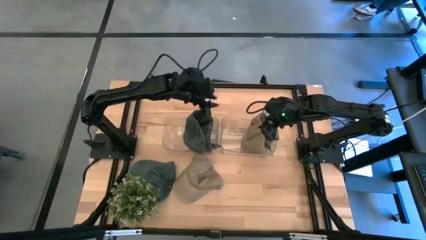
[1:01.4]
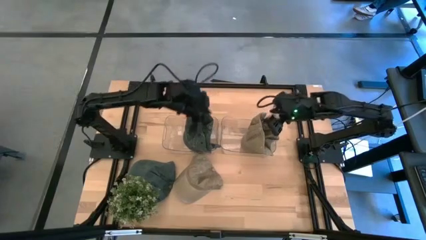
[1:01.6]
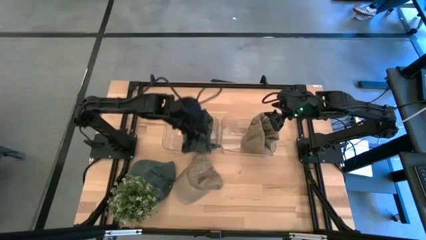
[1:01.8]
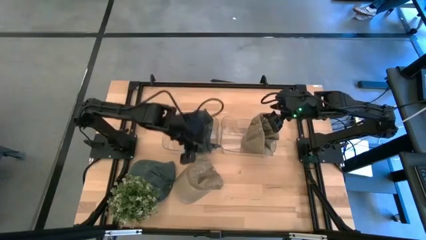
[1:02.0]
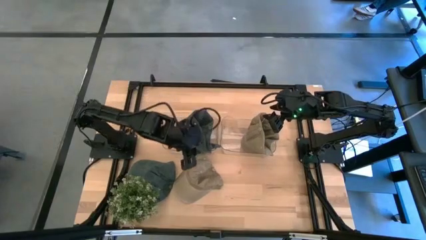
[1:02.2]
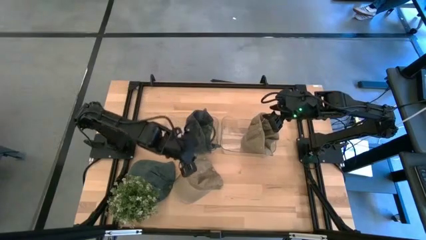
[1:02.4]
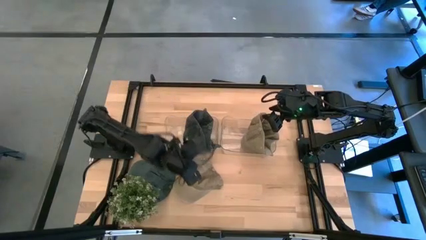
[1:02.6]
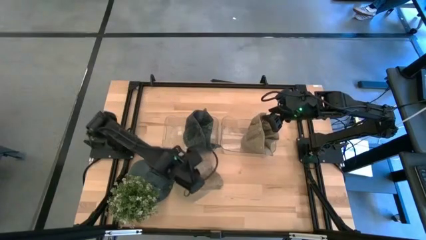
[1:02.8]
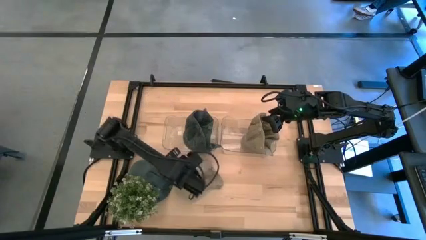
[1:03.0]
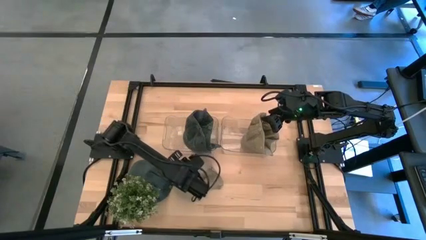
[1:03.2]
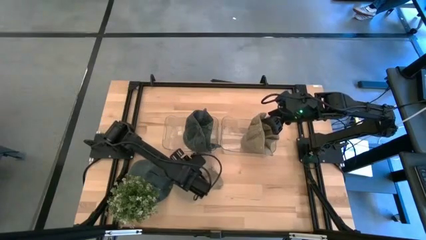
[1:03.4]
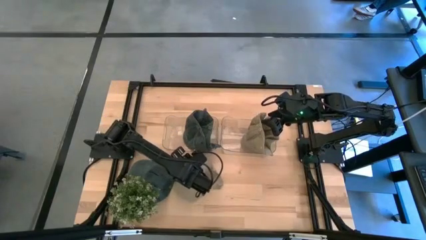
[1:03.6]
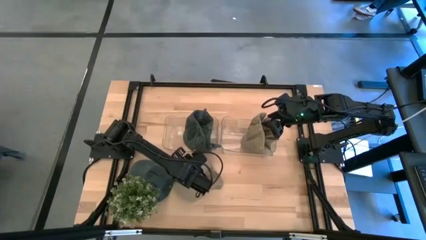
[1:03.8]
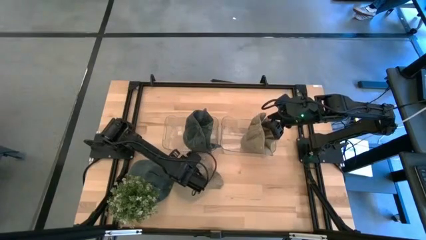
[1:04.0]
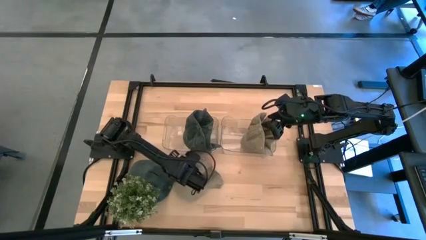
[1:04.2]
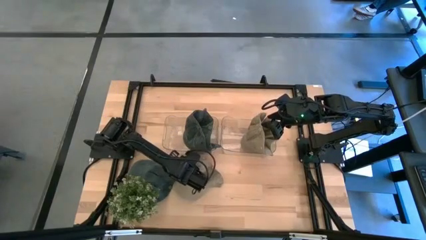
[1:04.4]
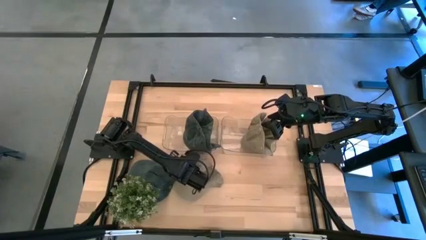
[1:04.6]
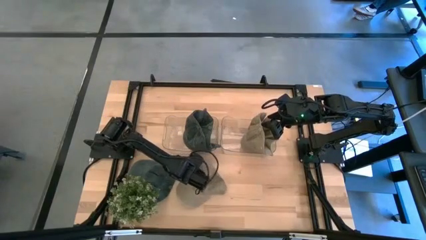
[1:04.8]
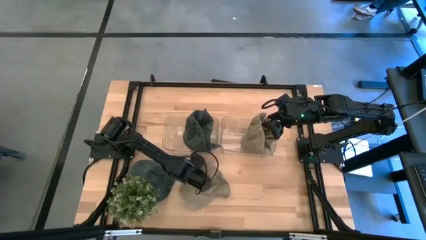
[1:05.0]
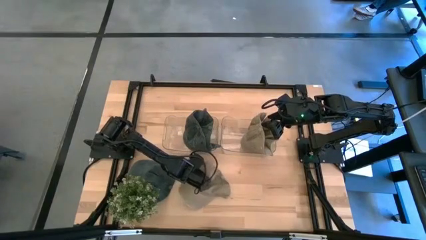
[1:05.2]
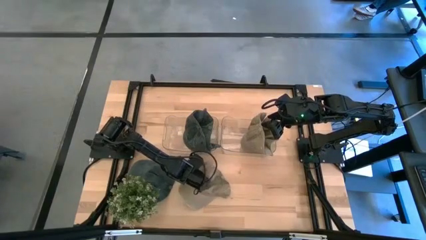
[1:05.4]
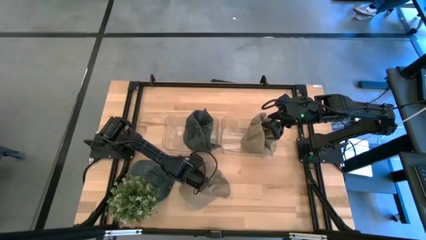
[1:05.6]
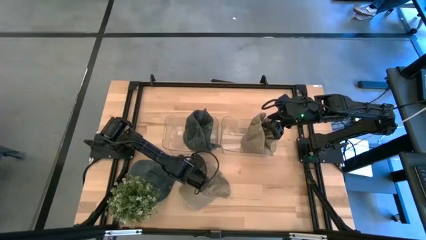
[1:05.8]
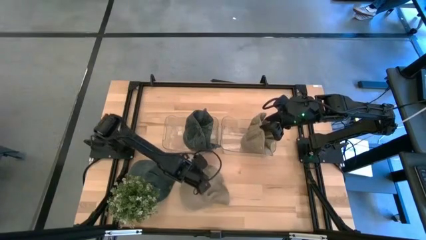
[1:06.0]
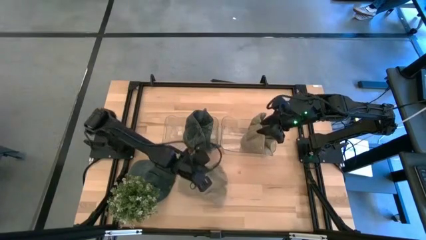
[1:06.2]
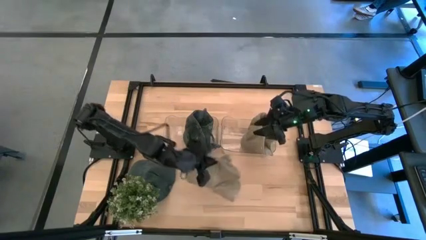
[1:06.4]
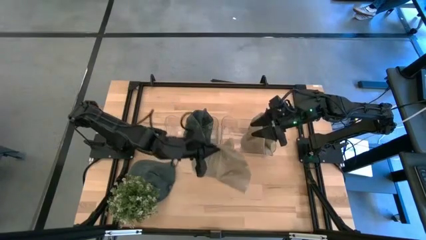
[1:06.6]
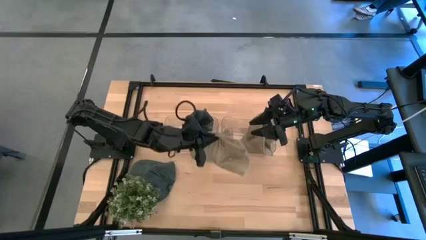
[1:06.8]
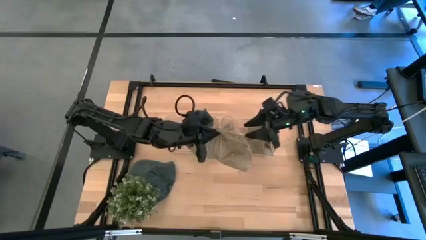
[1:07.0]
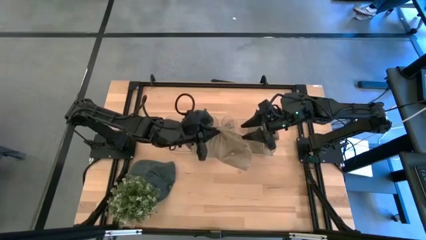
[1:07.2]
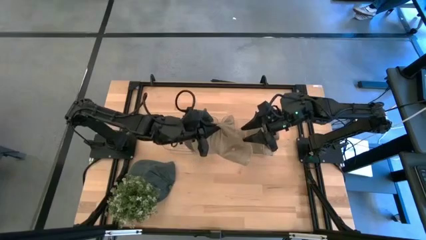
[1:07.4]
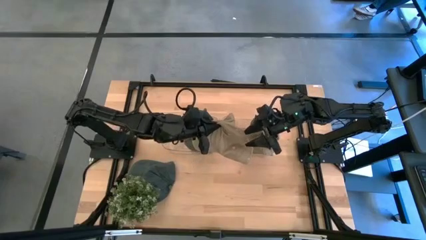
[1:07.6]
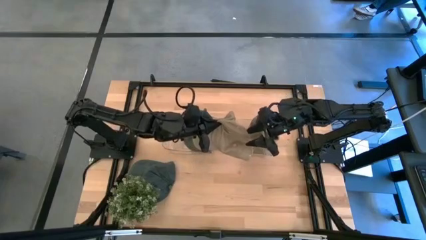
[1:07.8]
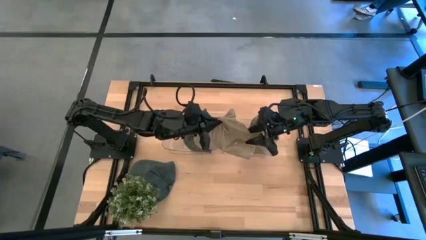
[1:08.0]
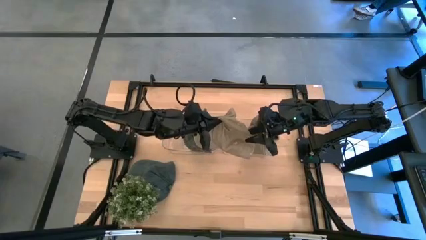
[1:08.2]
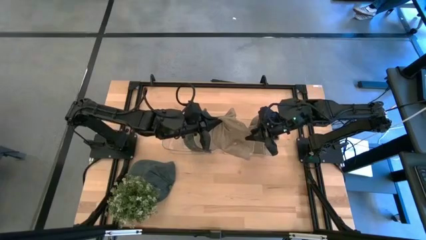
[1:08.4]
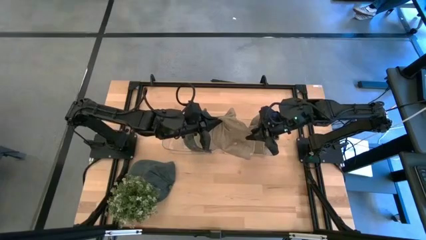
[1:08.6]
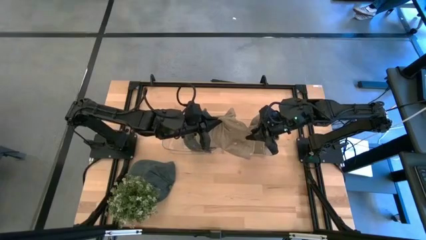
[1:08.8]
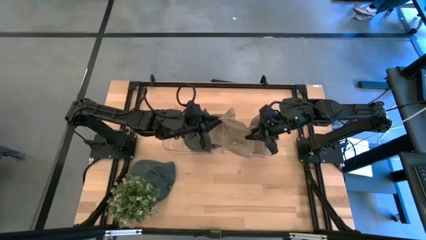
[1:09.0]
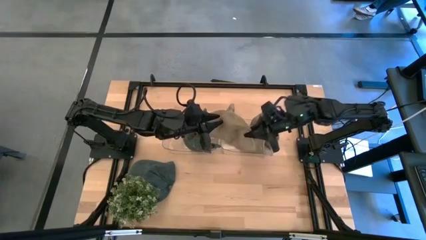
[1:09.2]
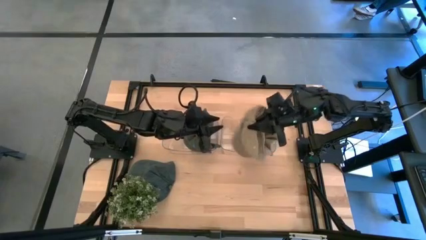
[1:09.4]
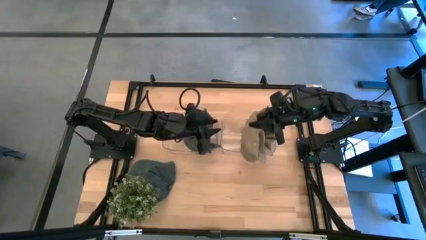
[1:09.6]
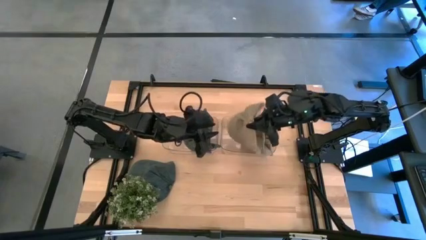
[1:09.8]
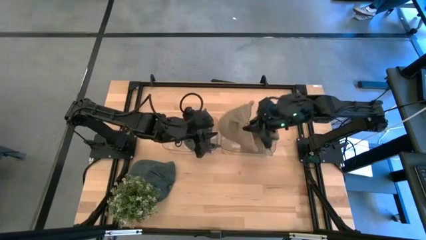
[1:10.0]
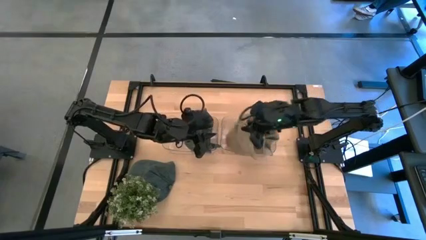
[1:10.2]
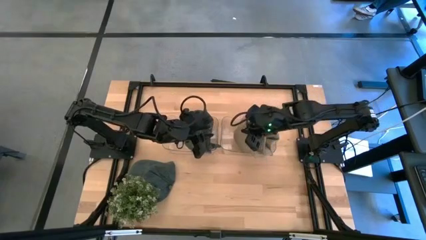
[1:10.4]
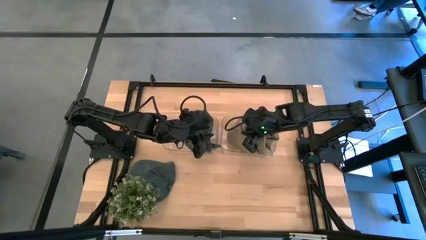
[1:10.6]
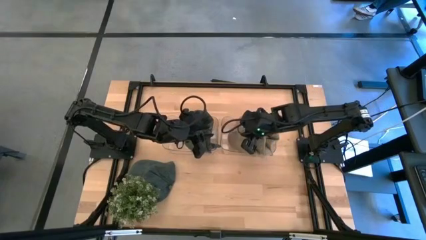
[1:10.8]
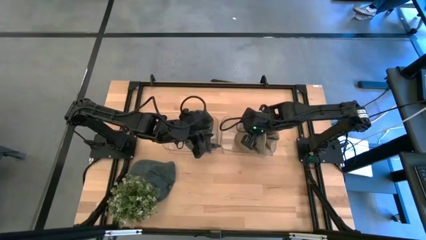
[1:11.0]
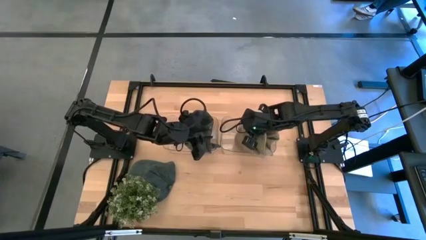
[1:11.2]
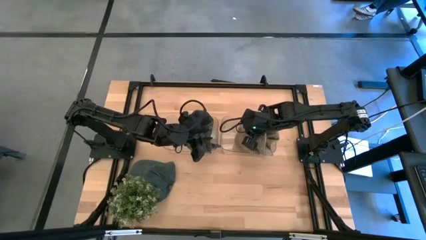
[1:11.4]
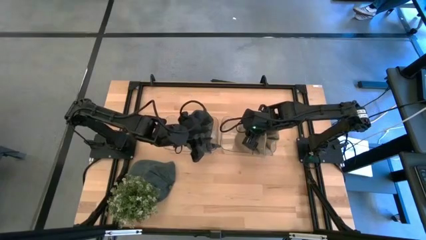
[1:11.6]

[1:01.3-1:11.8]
Task: Pick & Place hat
Put the brown cap into the right transparent bin

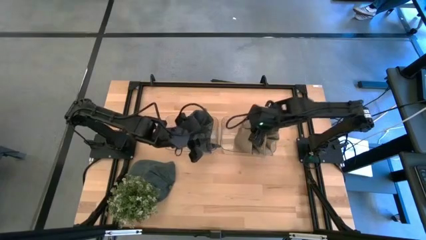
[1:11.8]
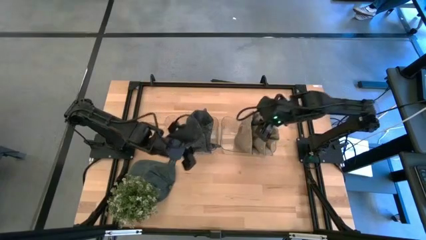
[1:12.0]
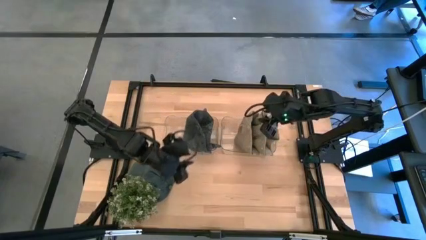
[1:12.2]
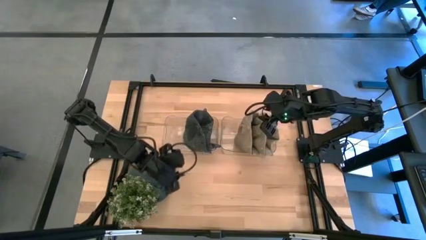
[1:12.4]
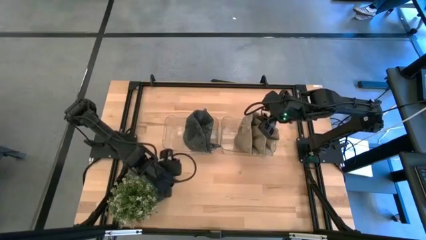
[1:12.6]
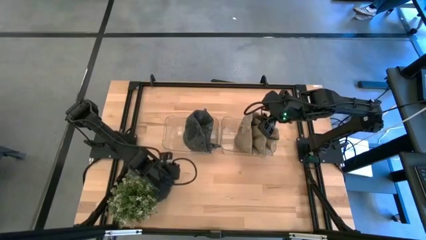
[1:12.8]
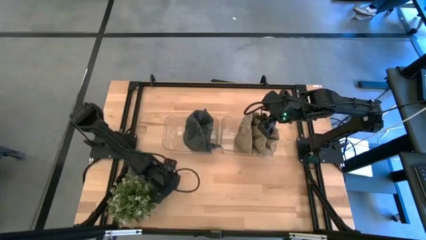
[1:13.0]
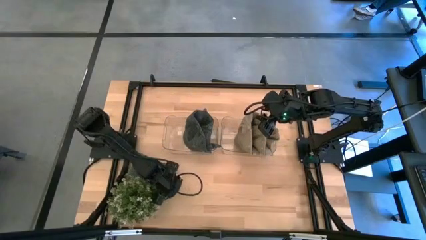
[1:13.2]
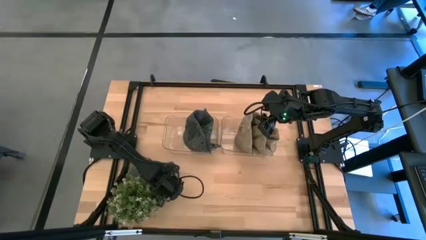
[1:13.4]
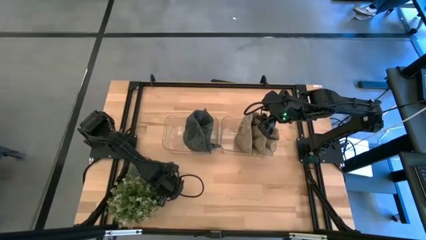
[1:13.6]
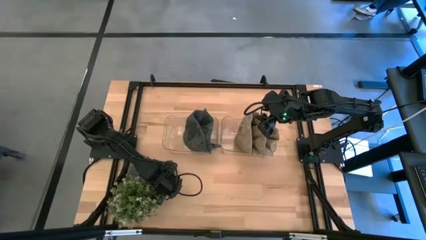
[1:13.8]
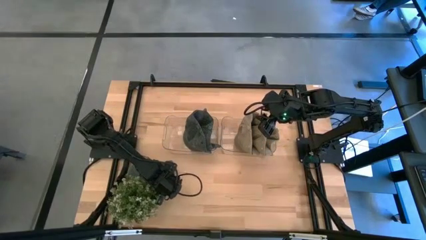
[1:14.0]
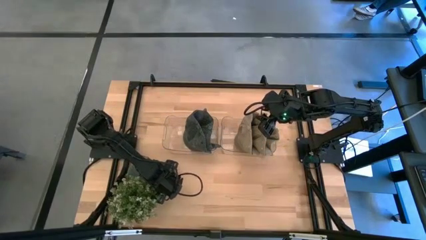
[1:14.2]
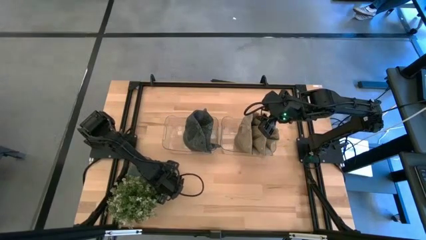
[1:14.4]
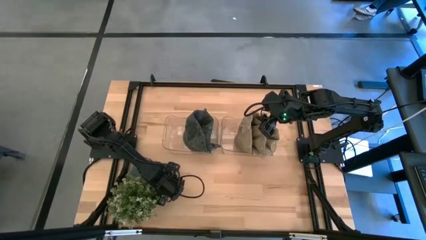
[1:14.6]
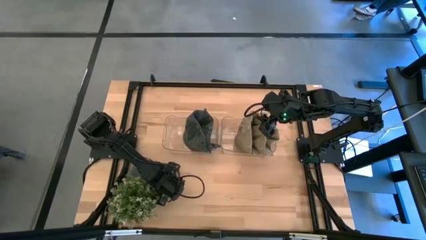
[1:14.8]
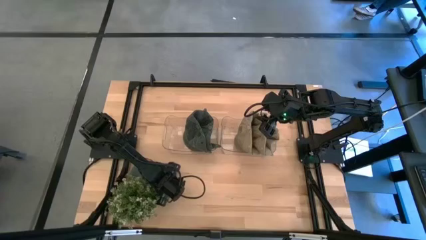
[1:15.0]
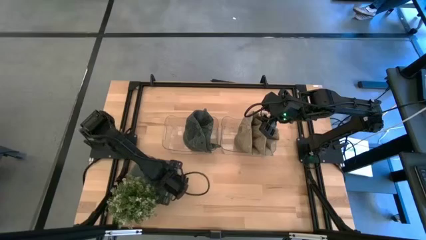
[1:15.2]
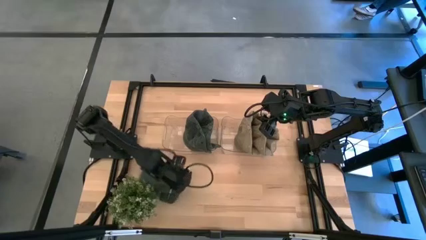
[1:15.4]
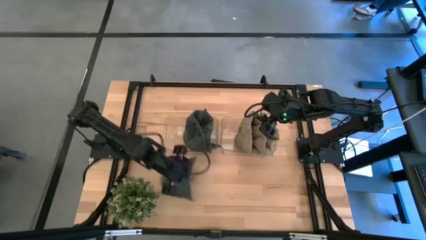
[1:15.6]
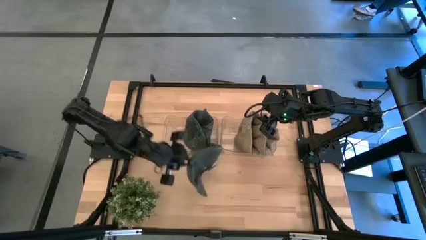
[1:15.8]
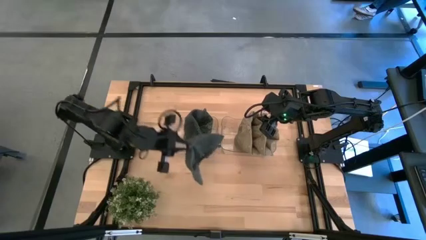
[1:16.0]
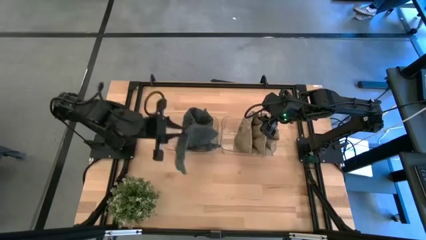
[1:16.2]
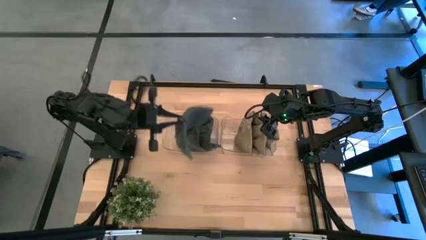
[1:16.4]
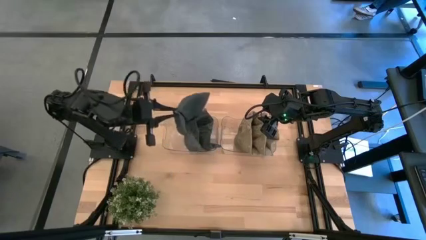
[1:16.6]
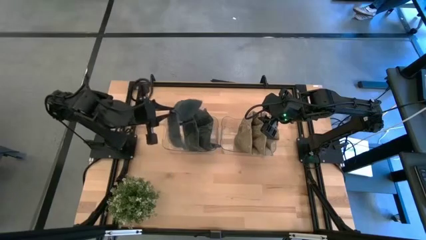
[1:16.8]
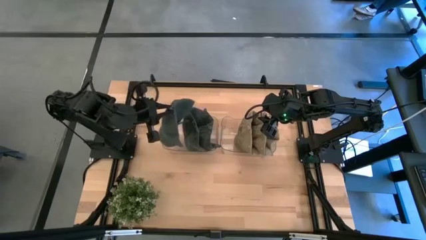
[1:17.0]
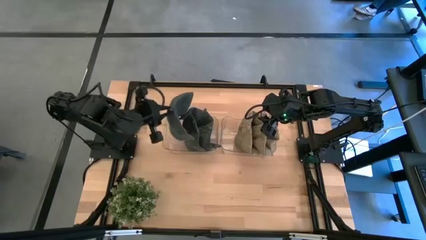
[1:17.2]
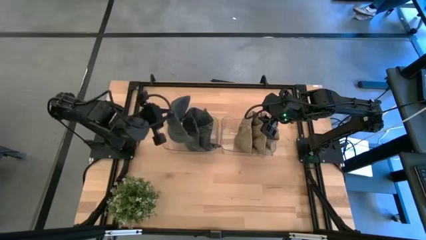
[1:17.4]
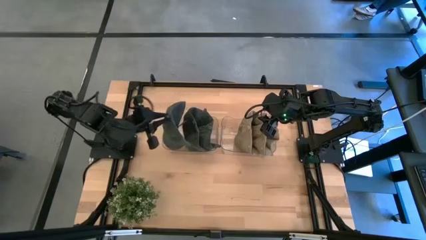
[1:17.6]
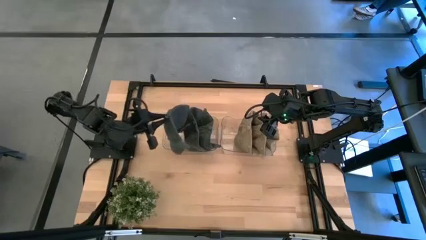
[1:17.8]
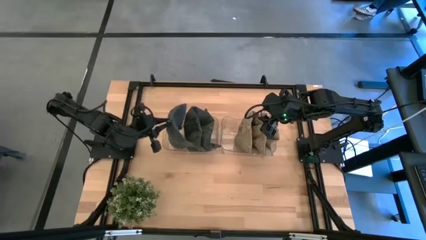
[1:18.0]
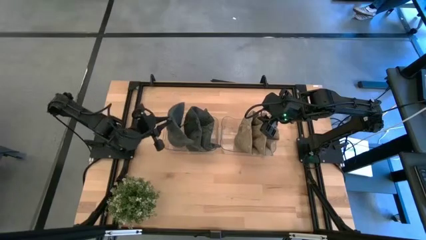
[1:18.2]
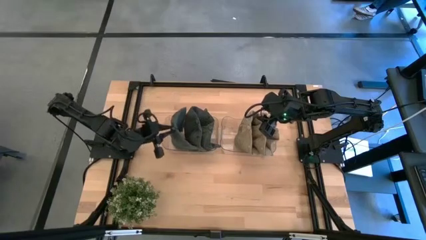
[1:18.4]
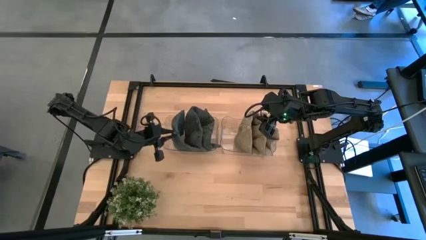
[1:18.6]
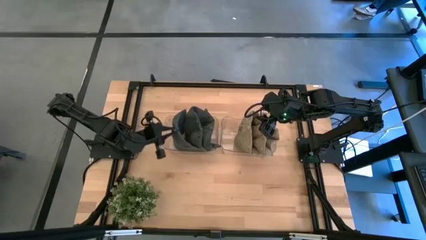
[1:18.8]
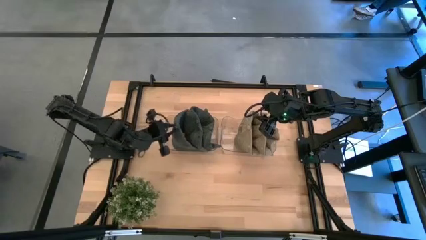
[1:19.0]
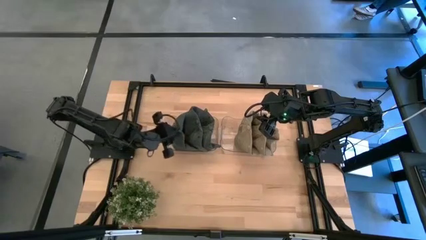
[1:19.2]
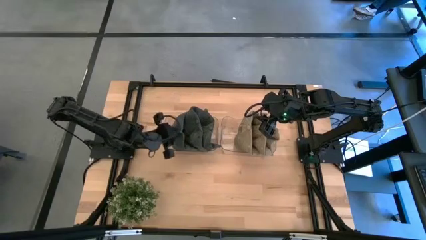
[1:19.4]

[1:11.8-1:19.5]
Put the blue cap into the left transparent bin
